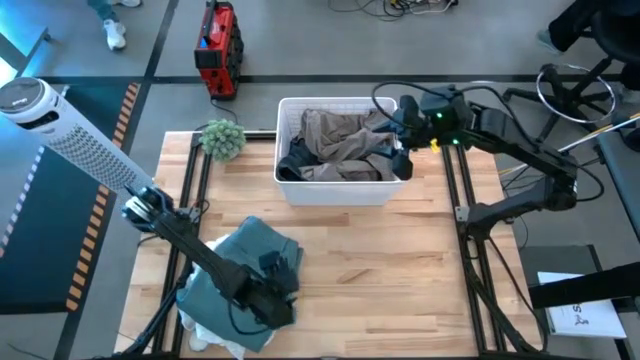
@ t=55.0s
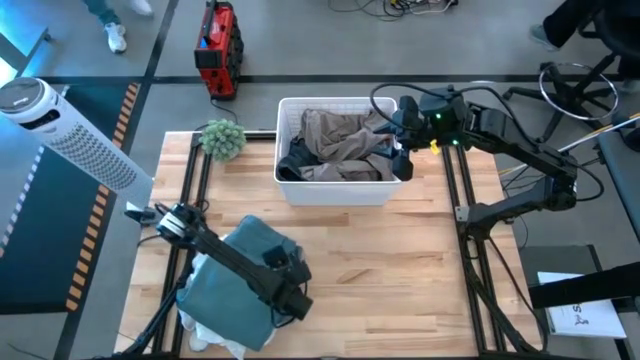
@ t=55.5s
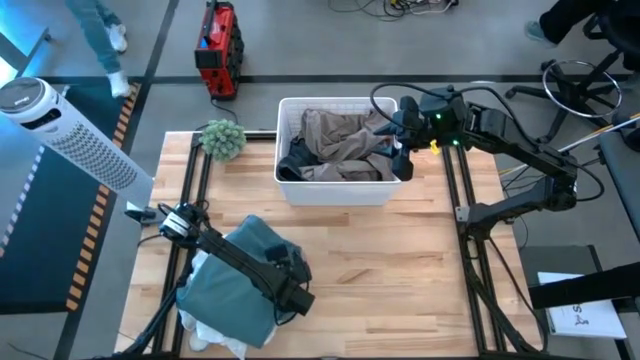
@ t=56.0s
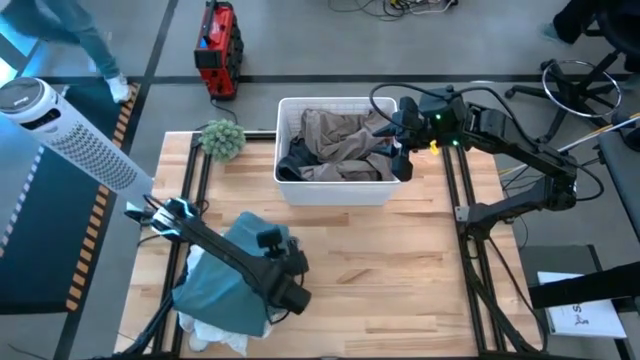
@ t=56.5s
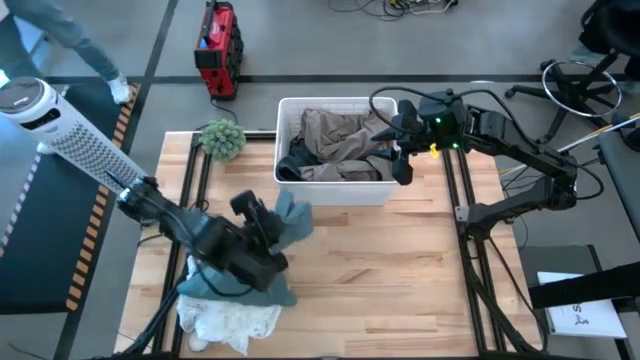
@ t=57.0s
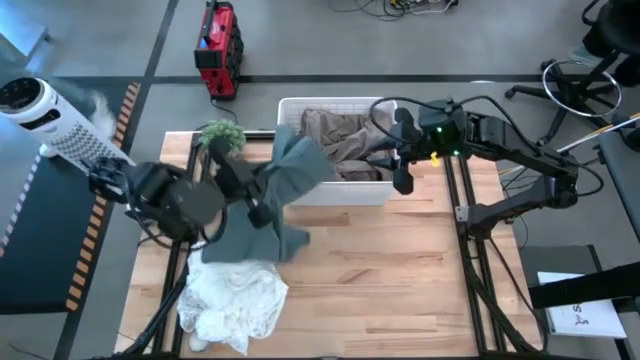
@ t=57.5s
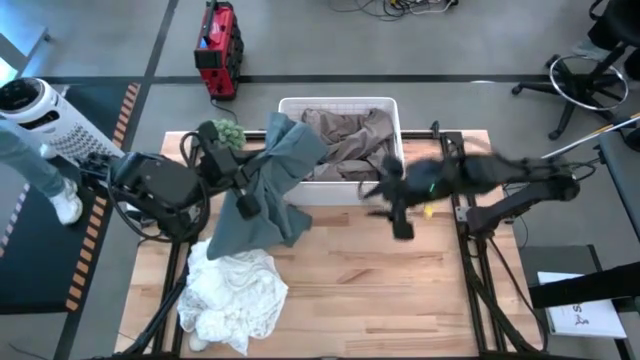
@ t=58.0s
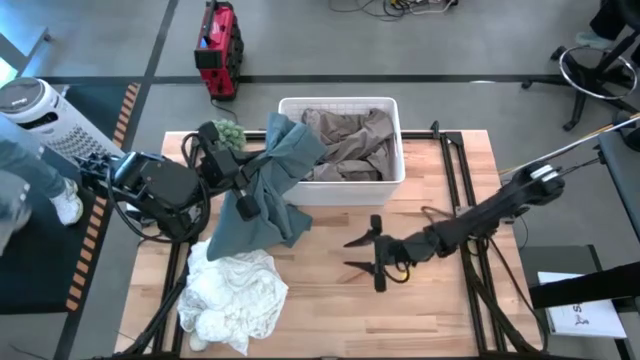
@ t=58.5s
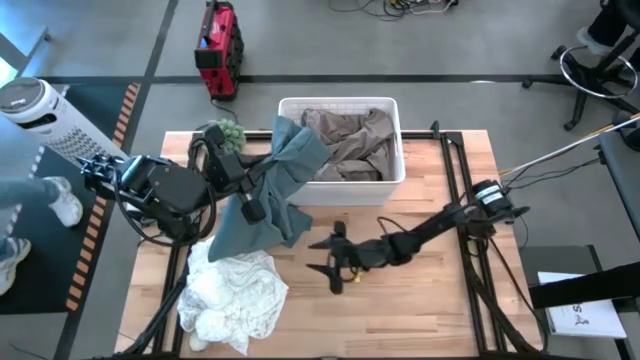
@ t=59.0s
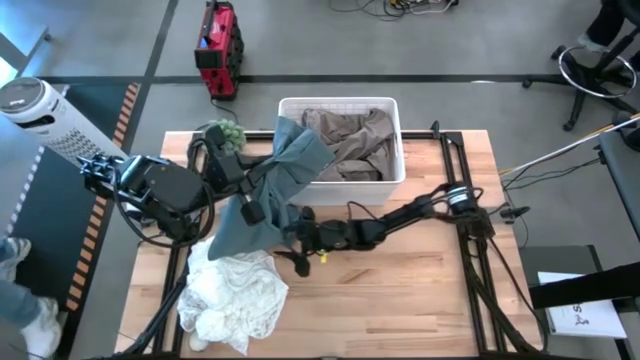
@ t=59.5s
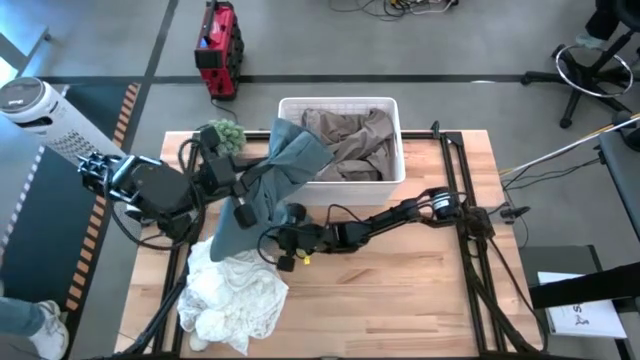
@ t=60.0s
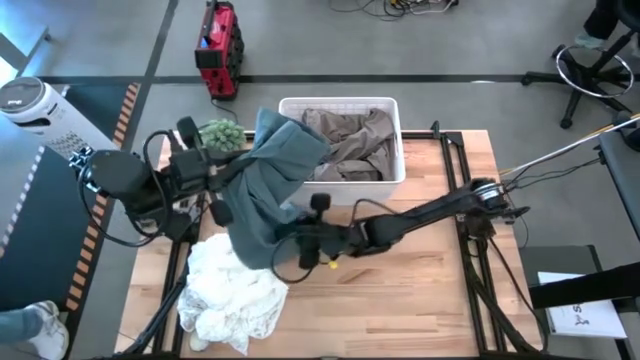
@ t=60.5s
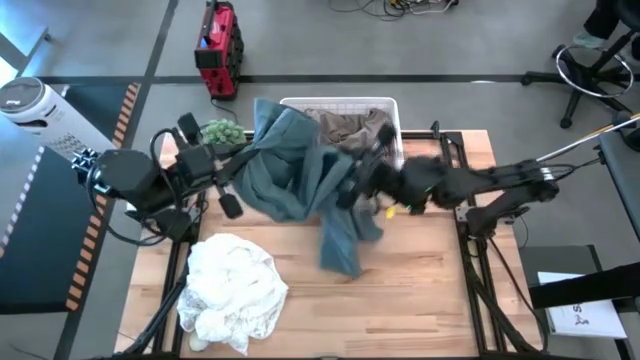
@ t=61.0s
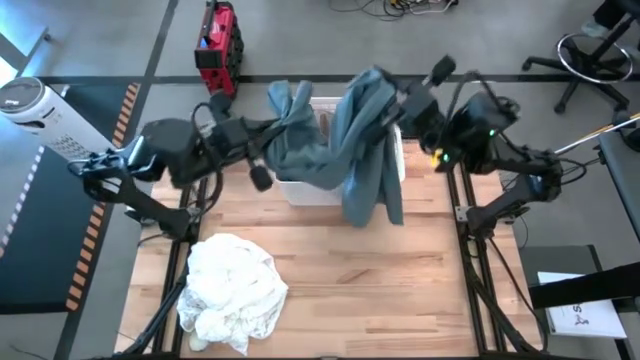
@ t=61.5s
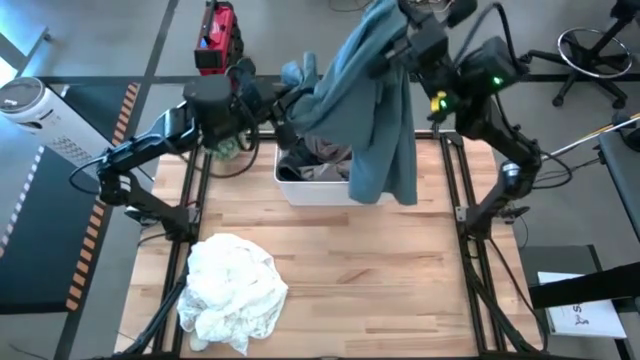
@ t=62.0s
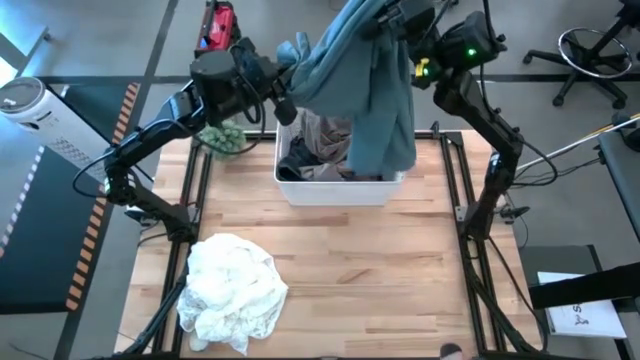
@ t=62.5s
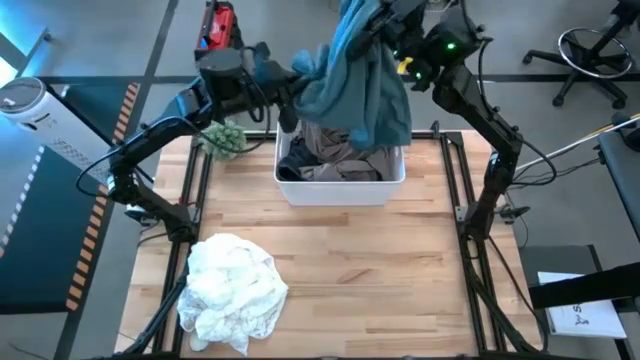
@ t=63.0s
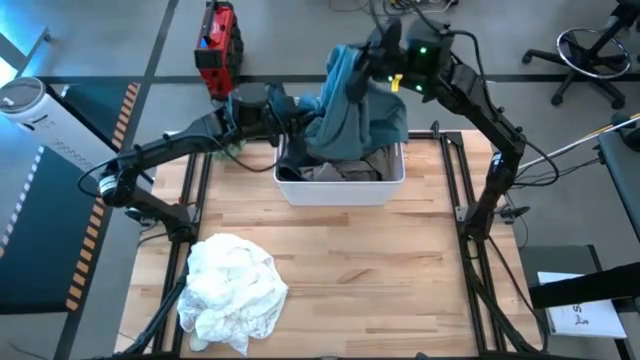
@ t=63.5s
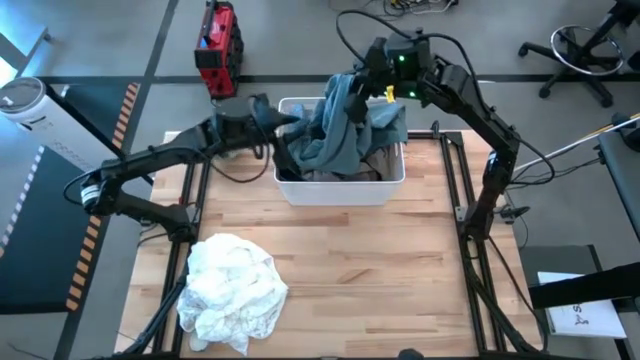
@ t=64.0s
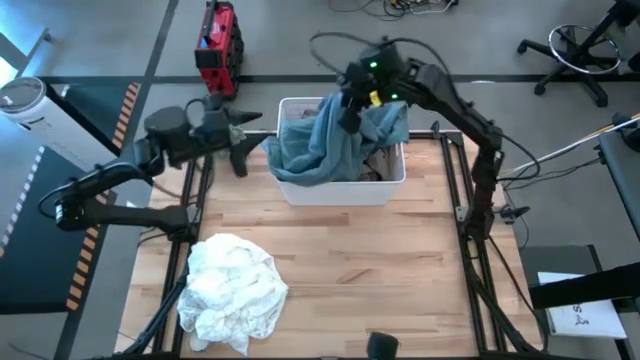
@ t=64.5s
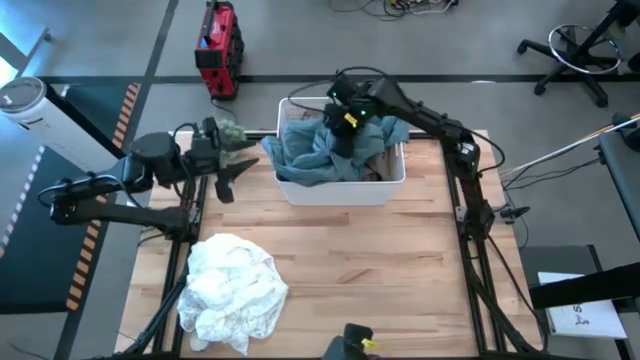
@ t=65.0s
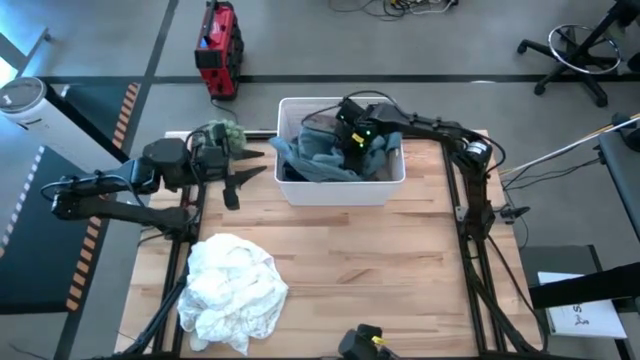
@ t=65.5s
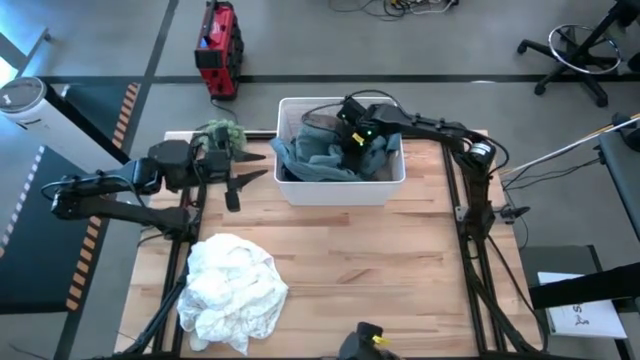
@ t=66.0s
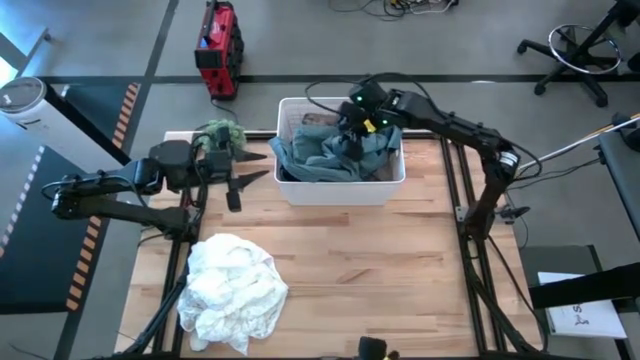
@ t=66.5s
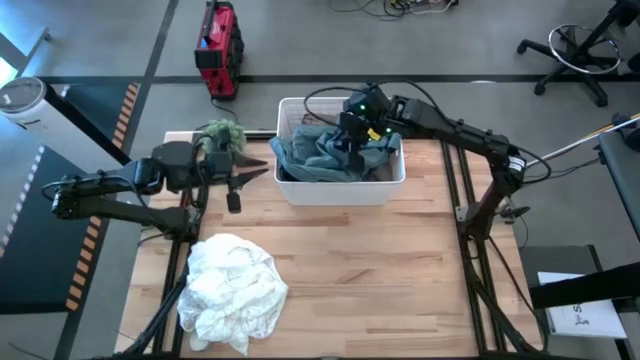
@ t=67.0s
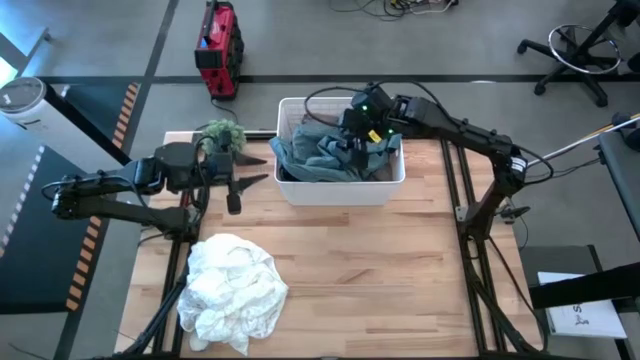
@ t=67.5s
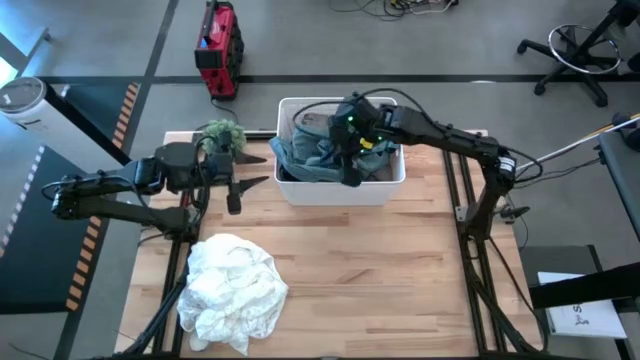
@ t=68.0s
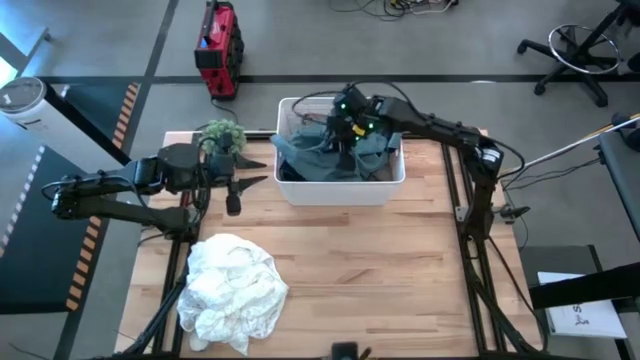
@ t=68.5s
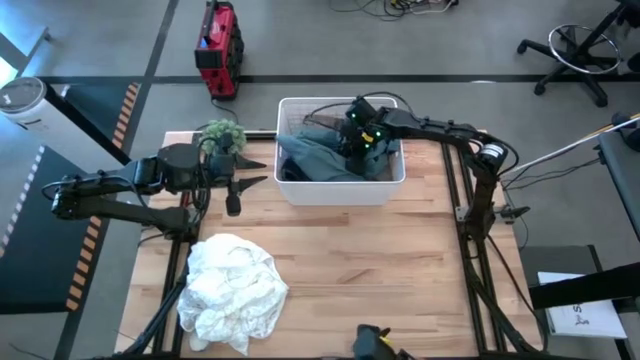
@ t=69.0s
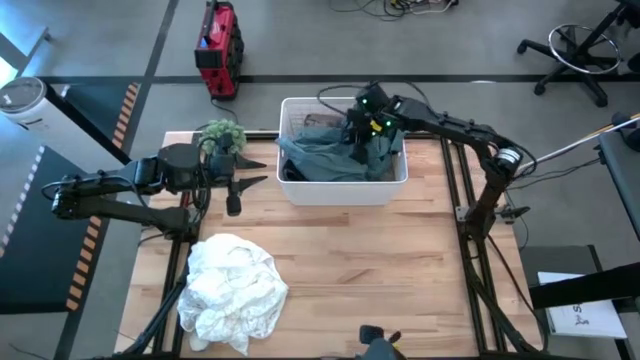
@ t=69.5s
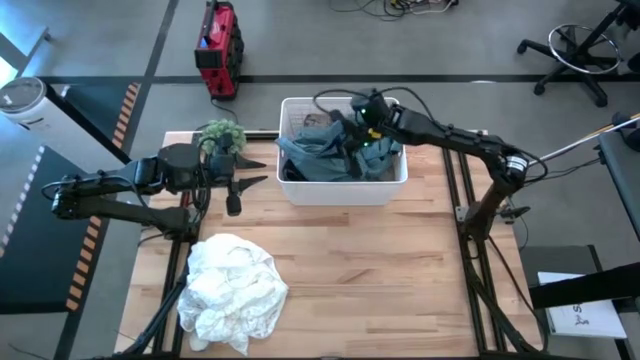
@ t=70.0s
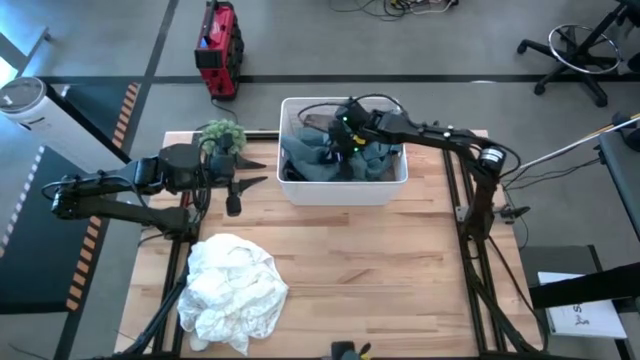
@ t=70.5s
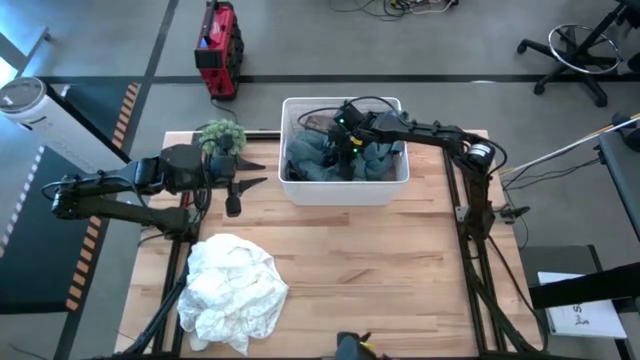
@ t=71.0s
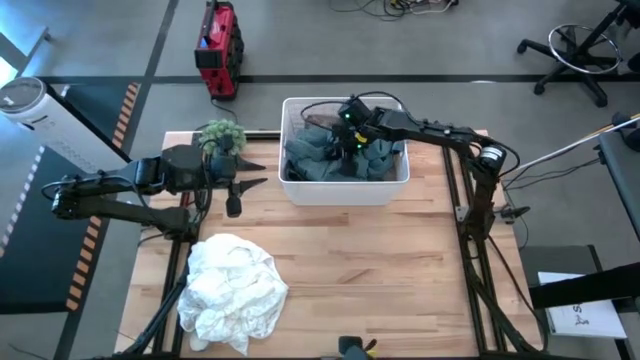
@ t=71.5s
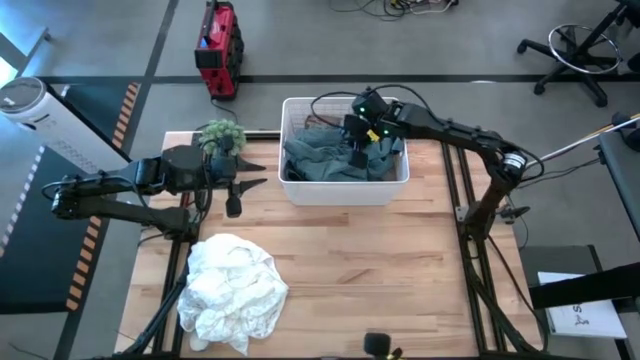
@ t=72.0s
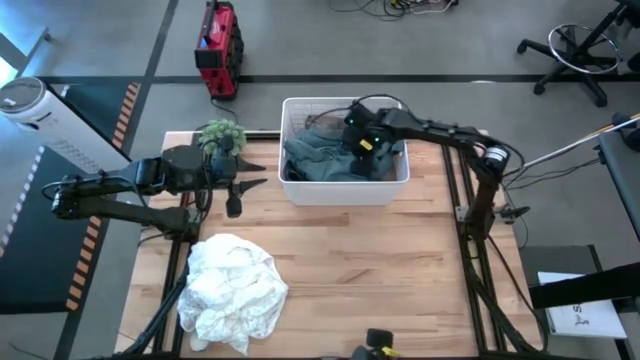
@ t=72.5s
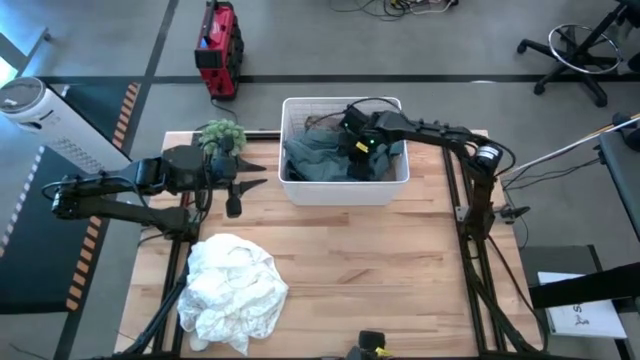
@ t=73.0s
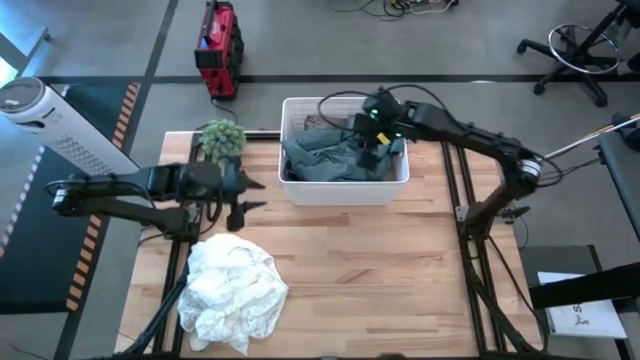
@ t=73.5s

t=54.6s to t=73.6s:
Task: Sort clothes
Put the blue pants into the white bin

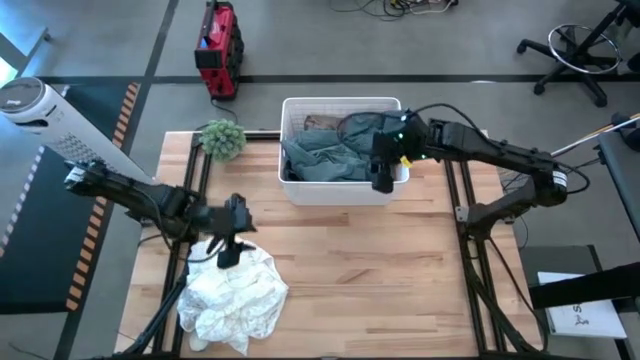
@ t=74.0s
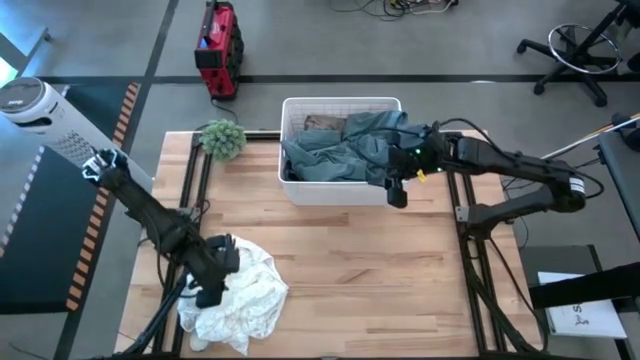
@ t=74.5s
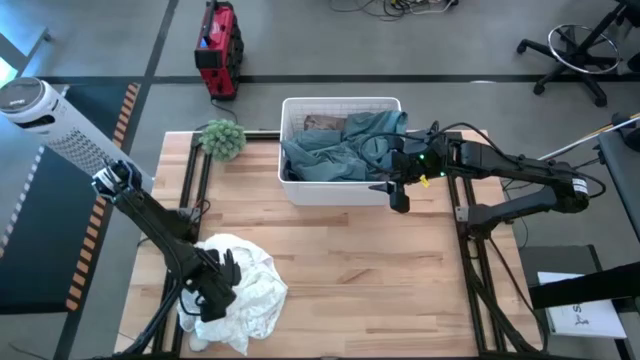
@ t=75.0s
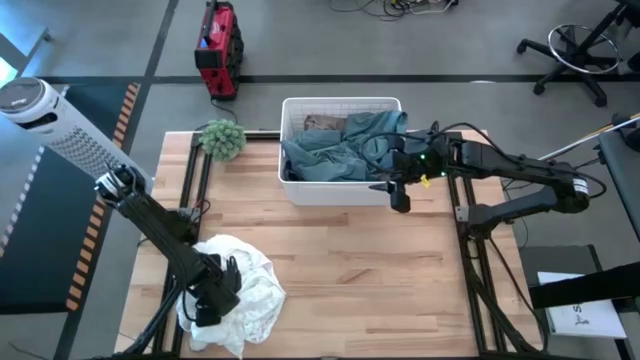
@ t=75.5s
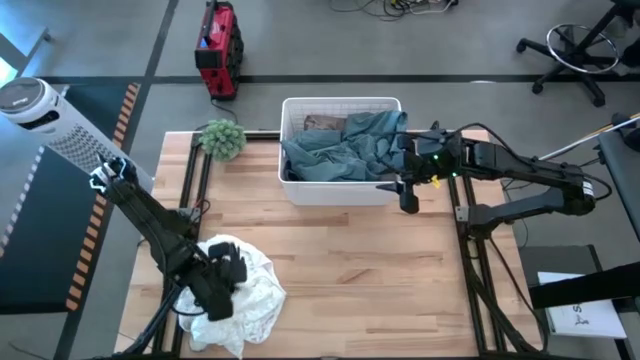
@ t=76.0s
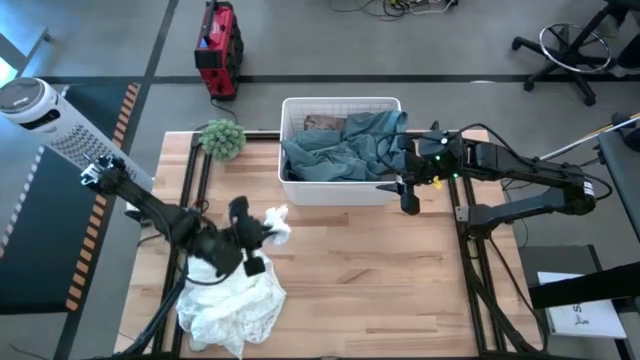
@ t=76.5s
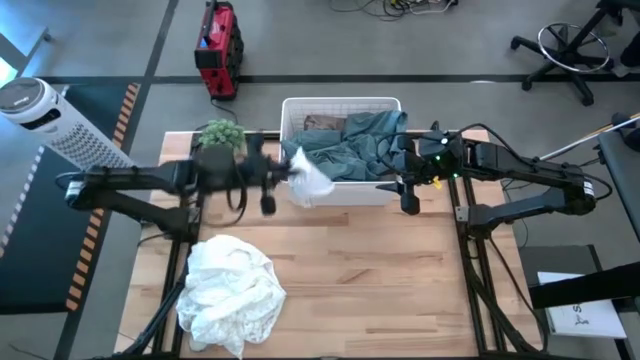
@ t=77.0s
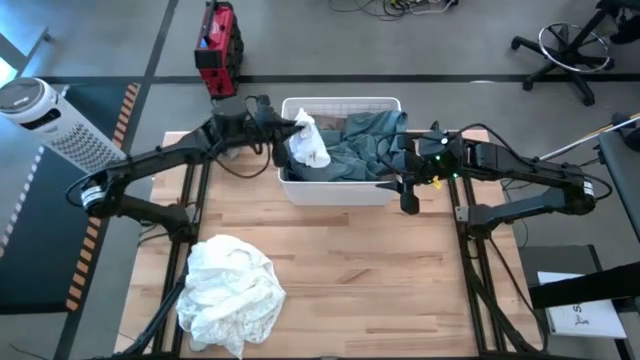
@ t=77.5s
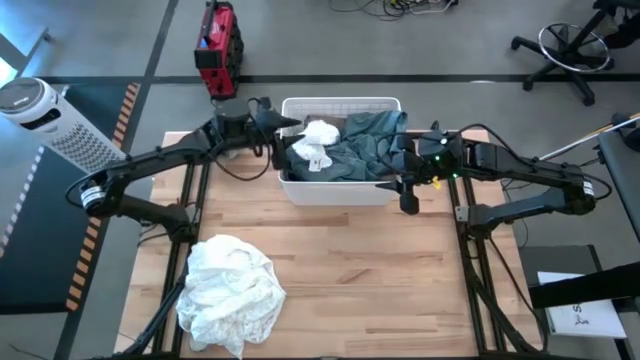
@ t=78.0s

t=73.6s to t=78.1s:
Put the white pair of socks into the white bin
